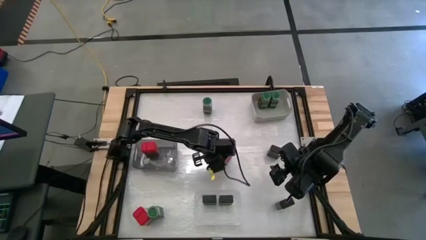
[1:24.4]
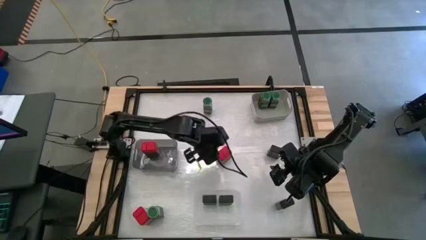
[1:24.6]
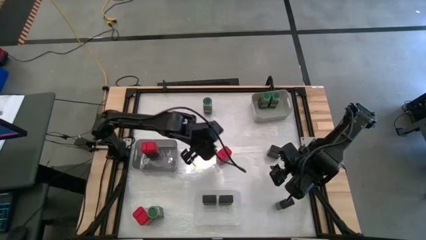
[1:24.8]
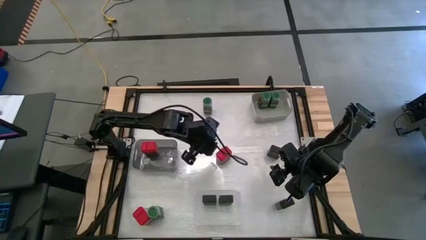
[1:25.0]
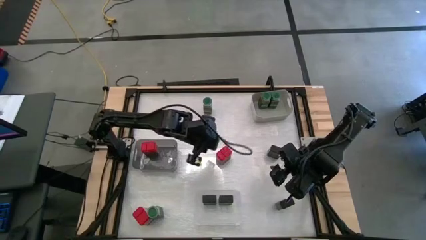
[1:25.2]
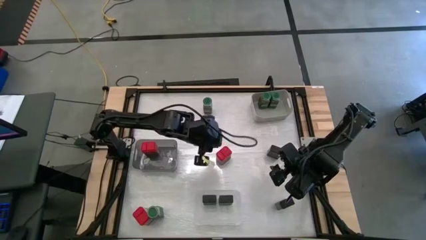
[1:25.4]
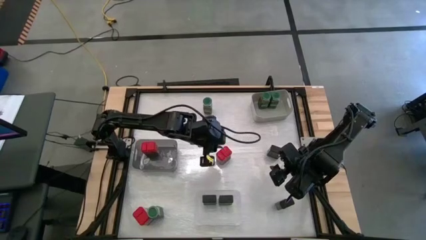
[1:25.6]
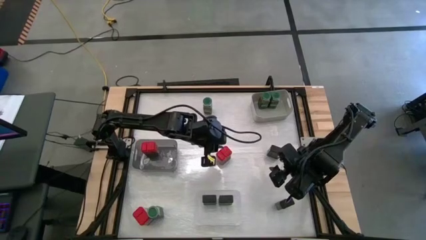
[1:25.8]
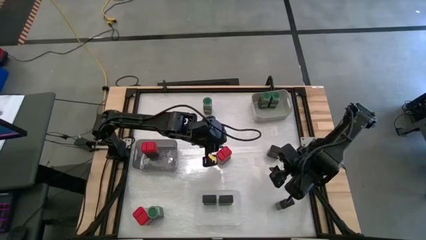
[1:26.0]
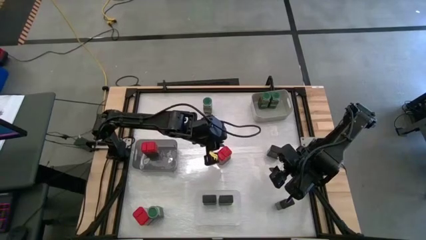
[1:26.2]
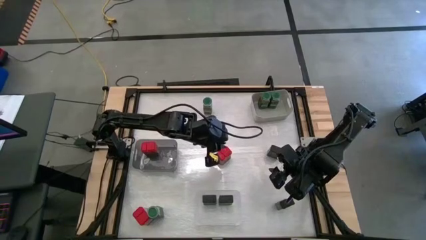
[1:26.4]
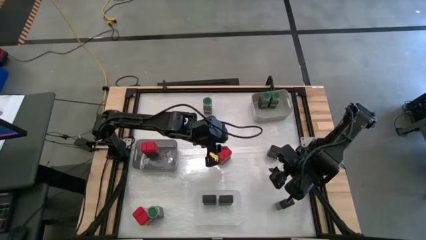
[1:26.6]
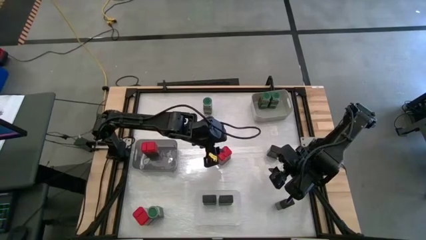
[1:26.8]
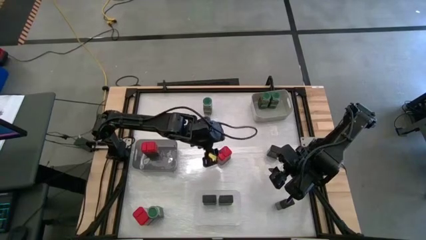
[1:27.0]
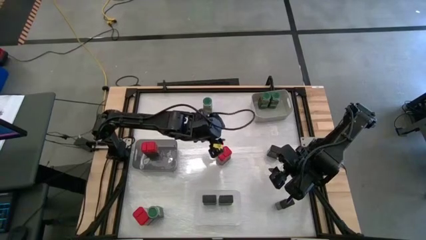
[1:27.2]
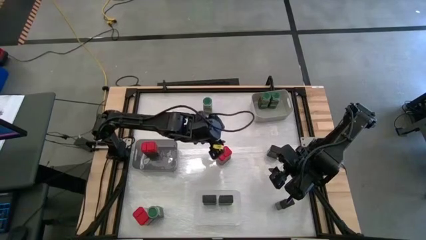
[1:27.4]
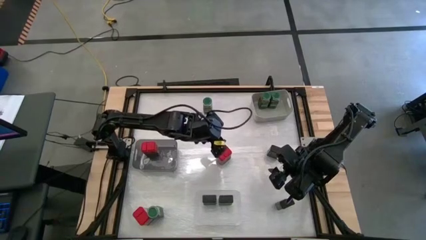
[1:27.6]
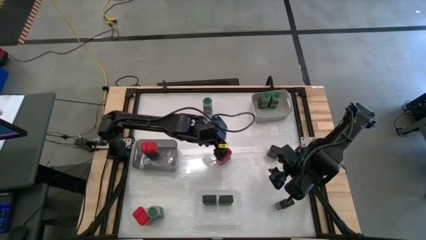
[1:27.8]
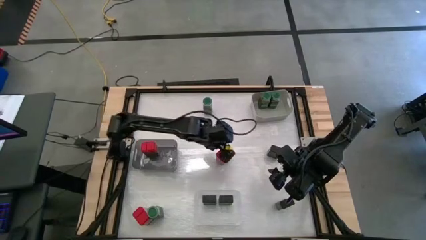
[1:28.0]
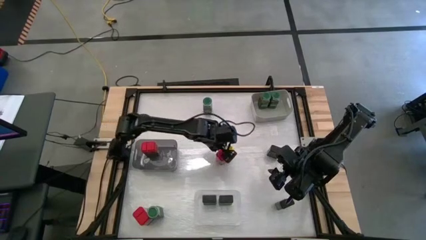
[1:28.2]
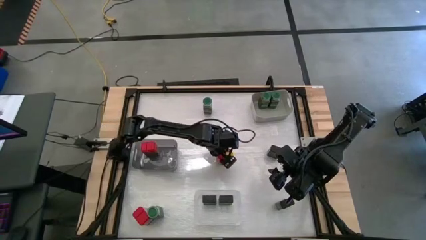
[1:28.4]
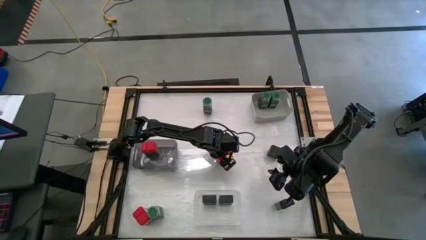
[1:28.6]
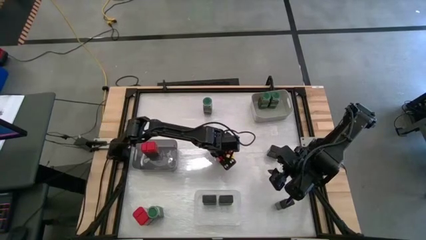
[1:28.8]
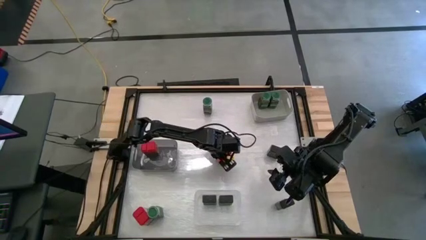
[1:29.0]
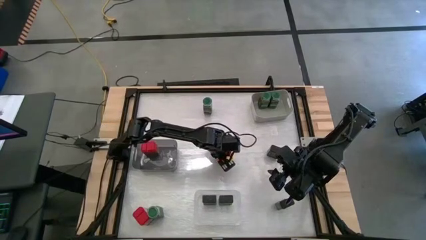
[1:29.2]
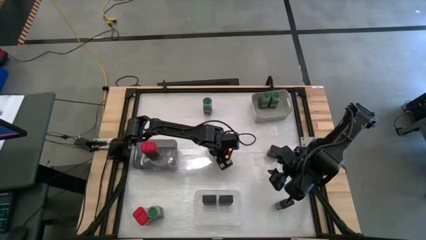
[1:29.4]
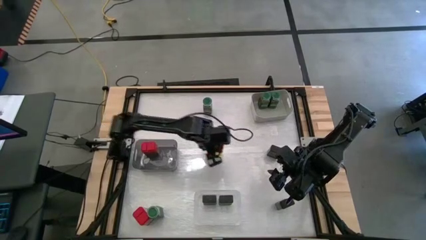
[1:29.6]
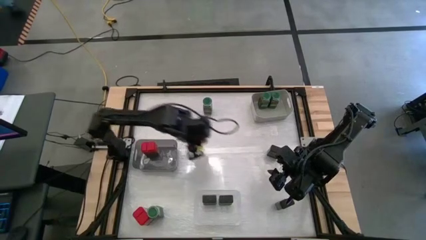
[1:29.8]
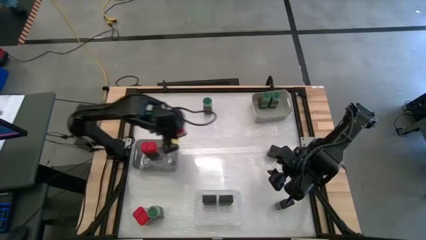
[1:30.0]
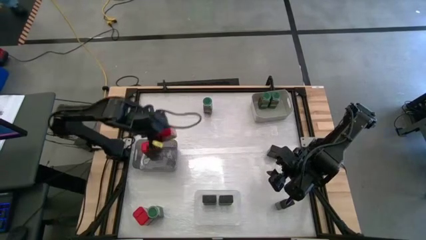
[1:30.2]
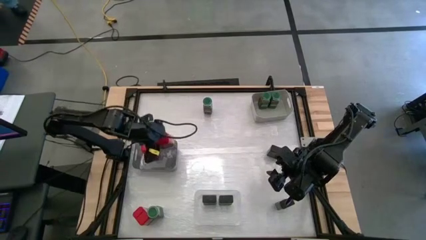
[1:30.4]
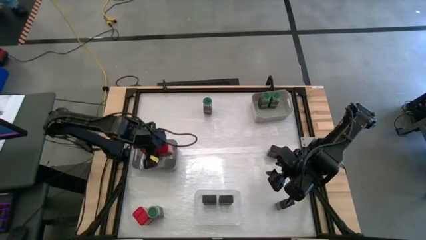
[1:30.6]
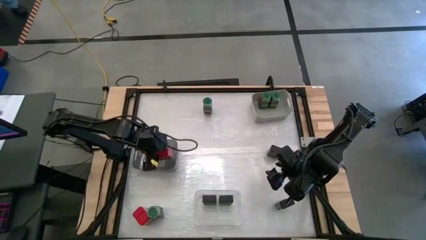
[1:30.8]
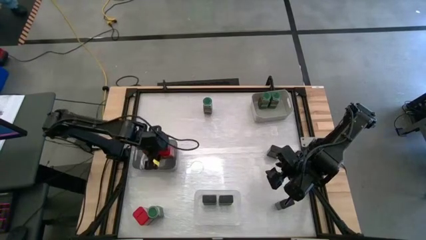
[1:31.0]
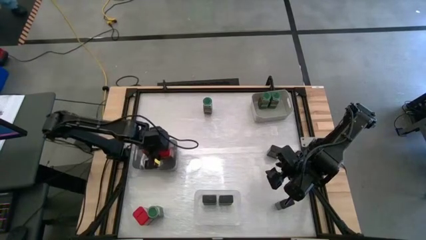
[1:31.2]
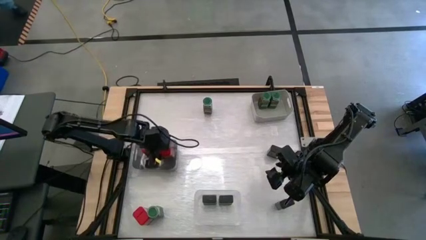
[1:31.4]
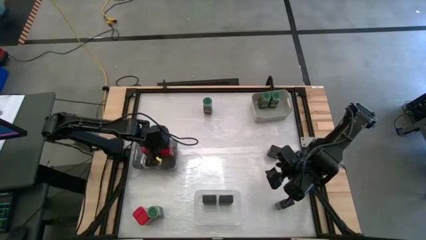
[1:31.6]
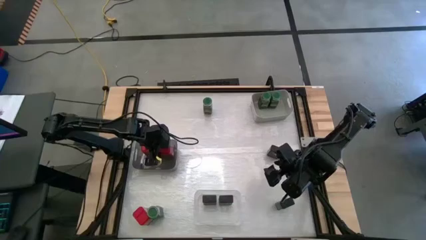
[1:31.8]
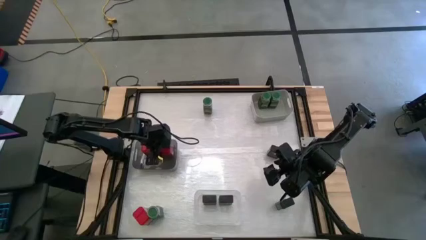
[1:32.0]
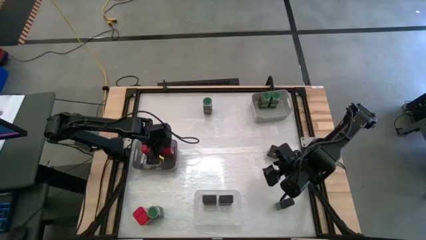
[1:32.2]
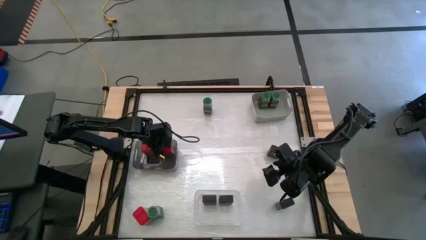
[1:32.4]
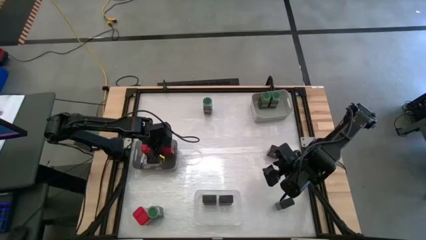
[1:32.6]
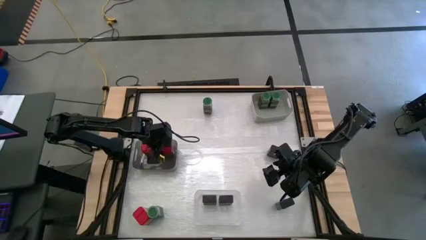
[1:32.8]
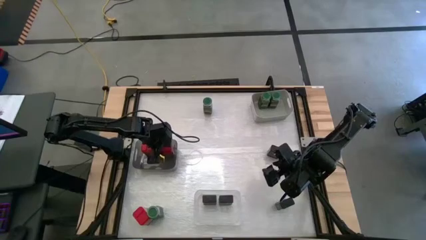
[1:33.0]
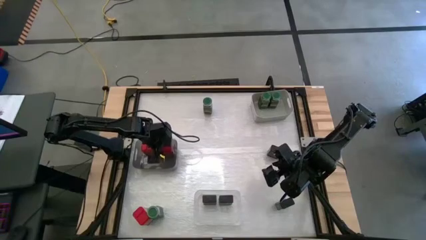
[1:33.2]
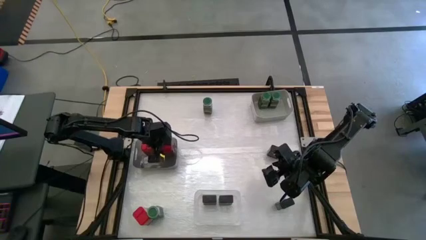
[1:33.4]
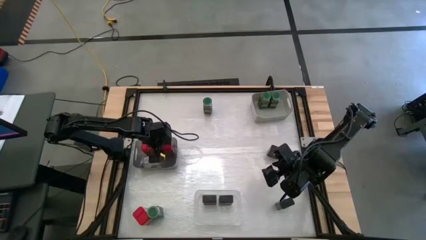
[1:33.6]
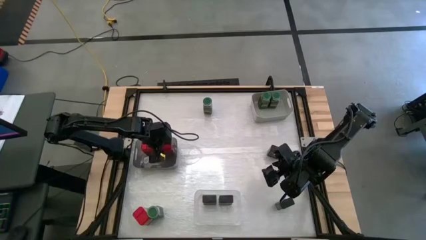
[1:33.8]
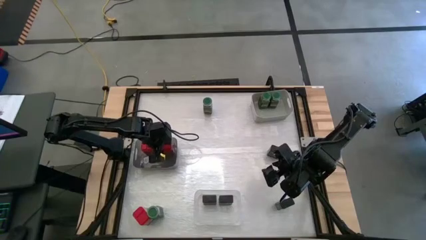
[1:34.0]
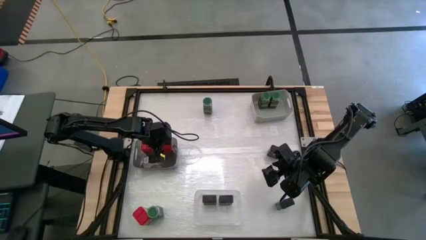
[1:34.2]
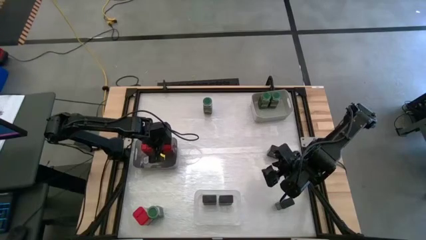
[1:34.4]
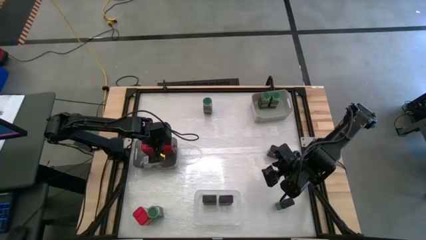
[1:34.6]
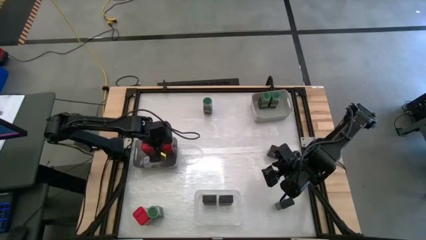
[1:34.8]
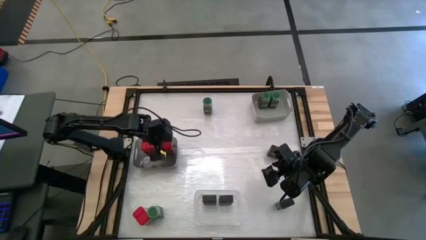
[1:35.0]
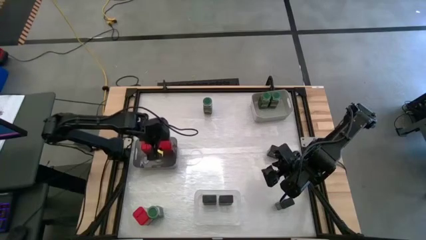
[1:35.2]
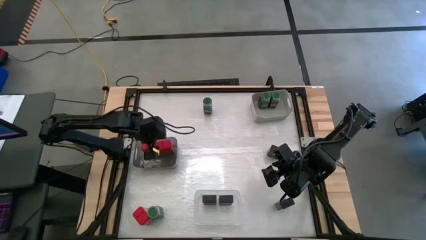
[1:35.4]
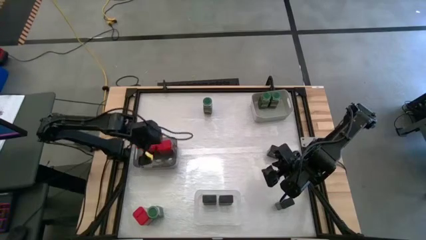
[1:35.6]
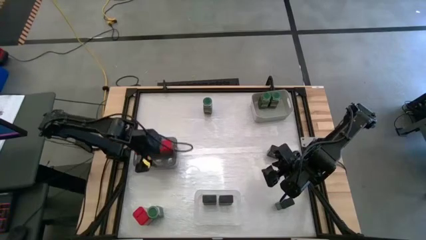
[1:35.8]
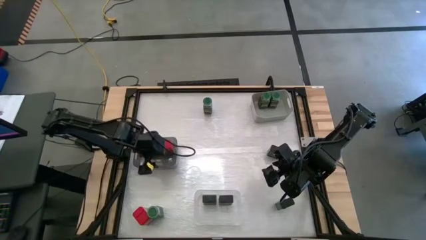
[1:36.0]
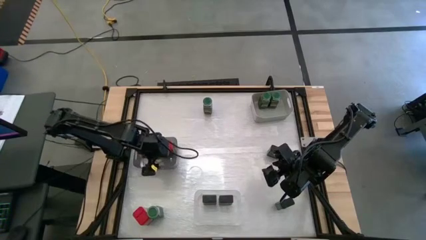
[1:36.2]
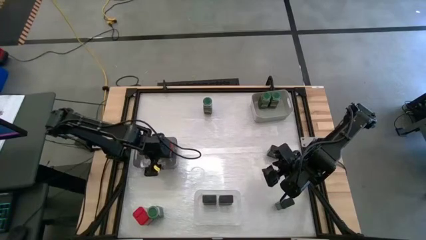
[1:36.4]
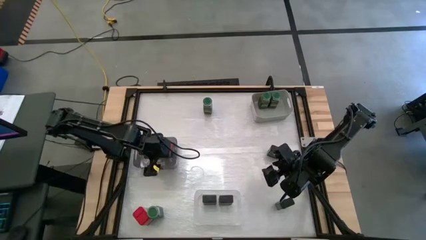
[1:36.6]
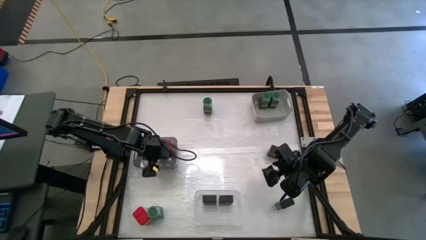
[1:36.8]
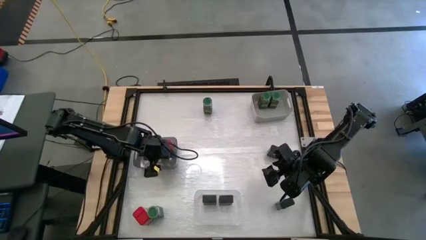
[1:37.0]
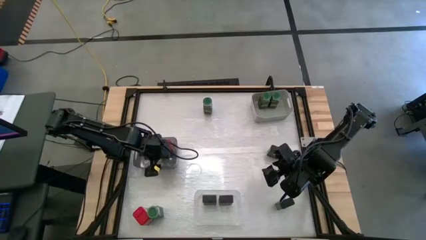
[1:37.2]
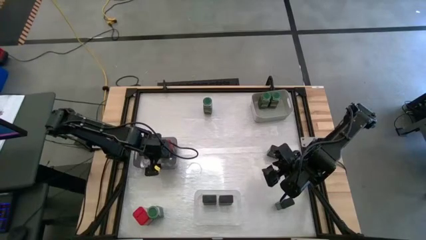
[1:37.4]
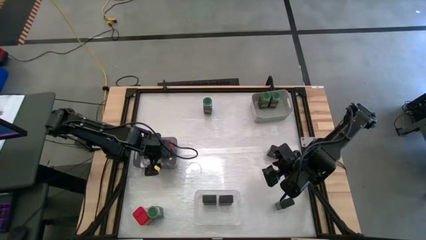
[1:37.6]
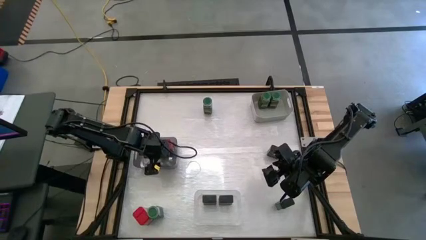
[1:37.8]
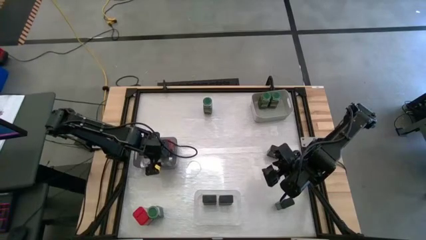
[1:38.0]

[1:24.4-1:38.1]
Task: Sort spices by type
Put the right red seasoning can into the black bin

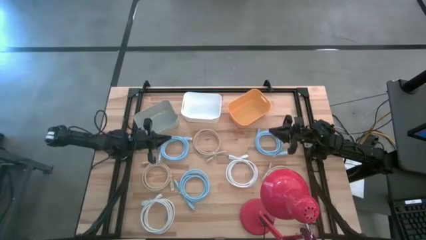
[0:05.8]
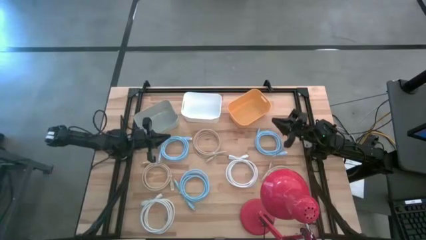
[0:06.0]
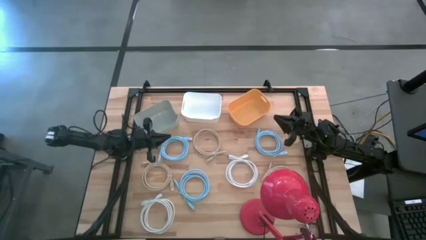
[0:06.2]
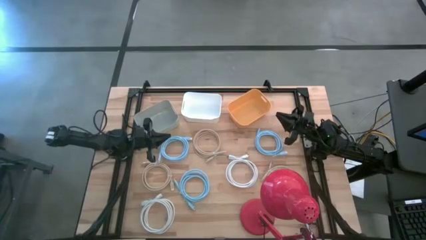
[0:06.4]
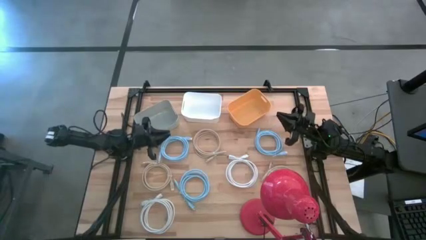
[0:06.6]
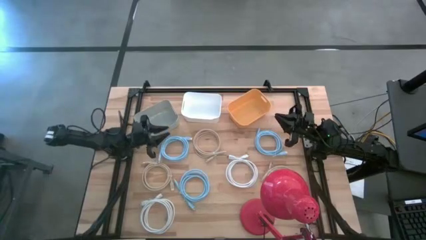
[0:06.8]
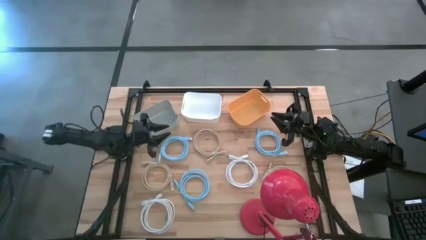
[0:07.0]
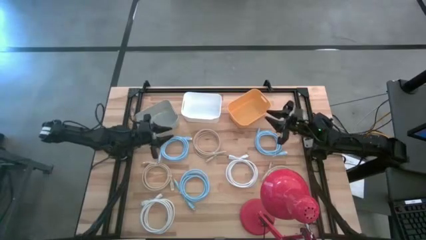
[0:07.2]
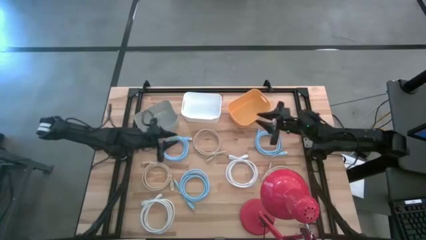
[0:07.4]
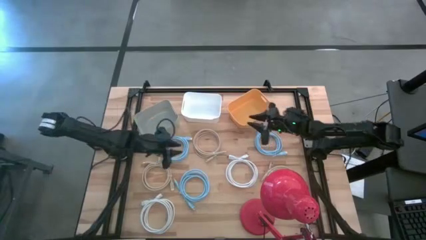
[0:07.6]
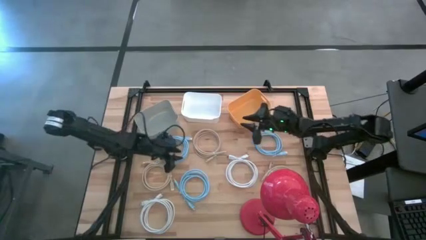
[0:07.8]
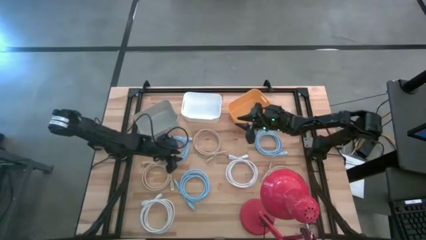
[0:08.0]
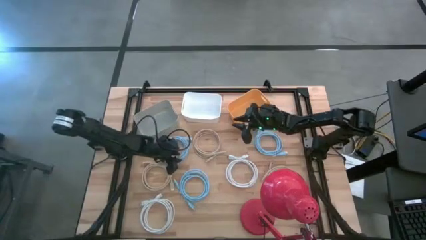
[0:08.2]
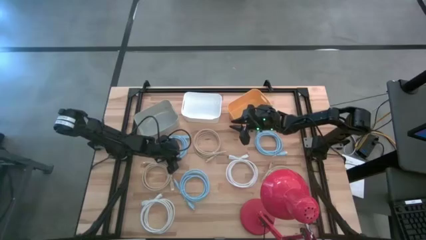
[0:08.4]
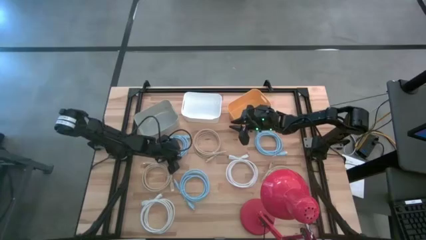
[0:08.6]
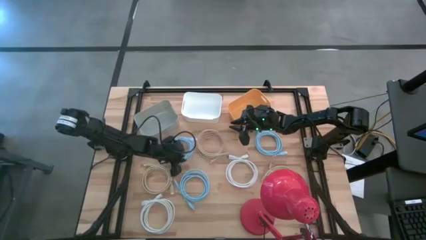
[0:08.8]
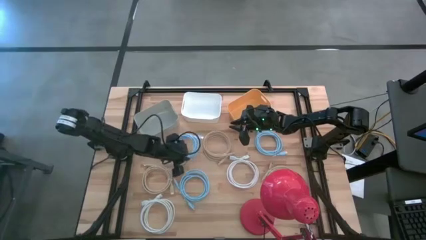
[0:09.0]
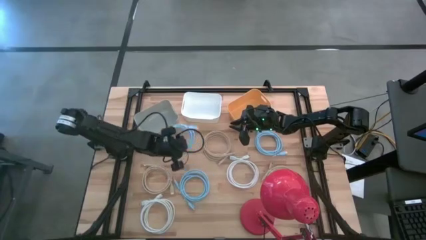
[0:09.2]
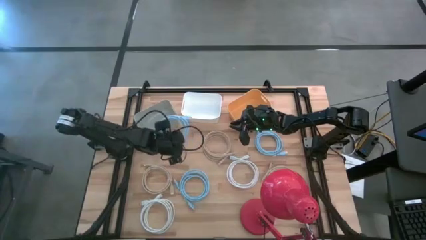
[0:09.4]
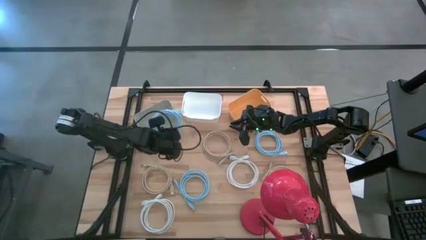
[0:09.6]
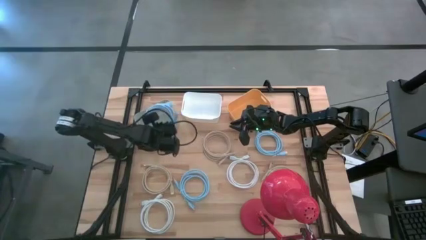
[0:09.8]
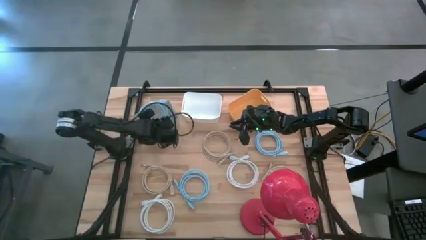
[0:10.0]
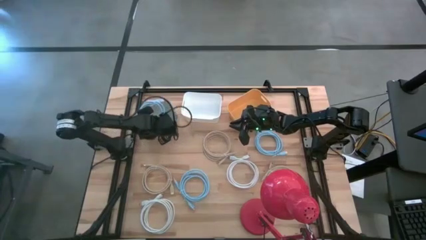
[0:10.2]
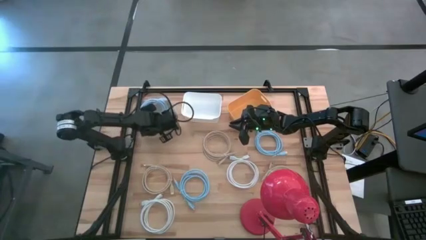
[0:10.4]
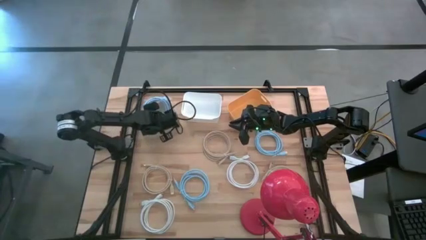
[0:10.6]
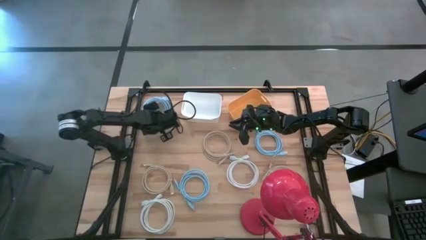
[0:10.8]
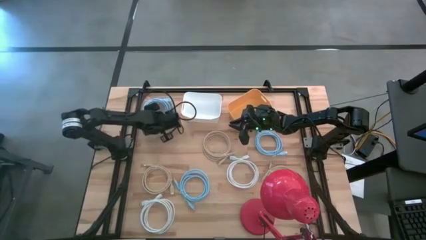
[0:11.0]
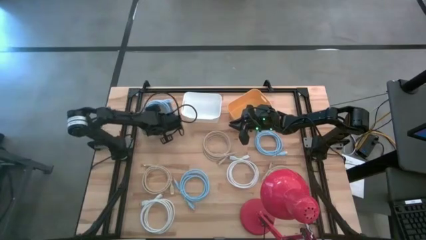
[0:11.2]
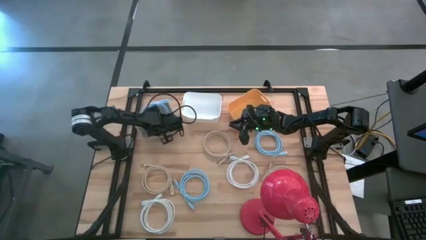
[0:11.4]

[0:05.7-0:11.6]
Task: Pick & Place USB Port
Put the top left blue USB cable into the gray bin
